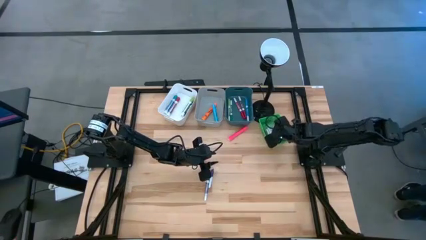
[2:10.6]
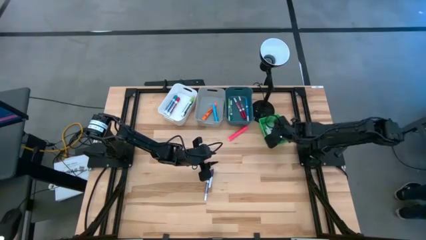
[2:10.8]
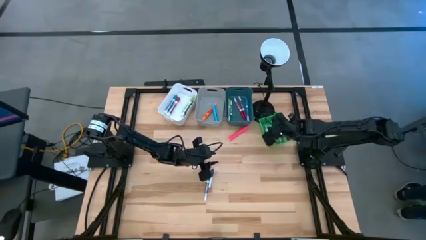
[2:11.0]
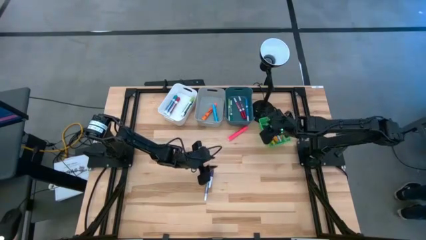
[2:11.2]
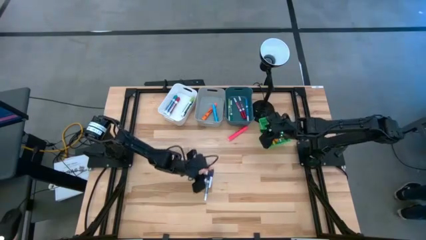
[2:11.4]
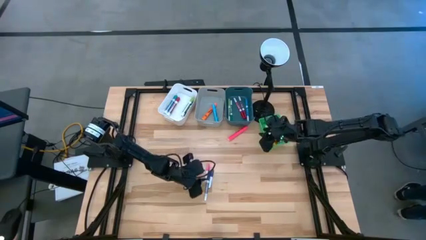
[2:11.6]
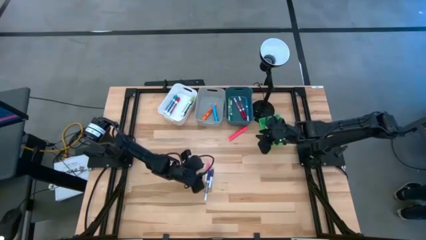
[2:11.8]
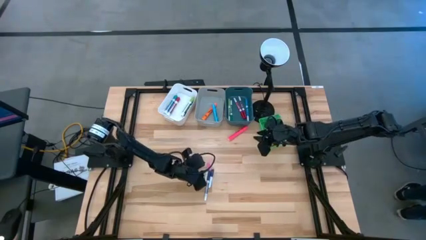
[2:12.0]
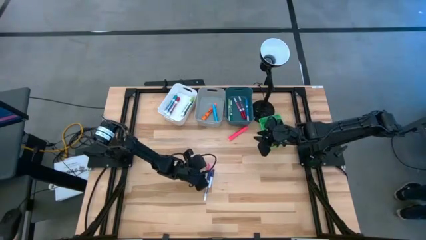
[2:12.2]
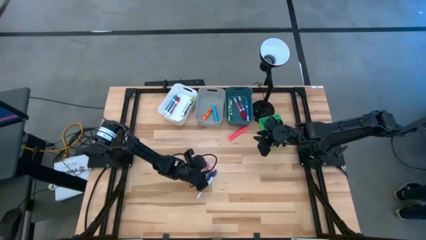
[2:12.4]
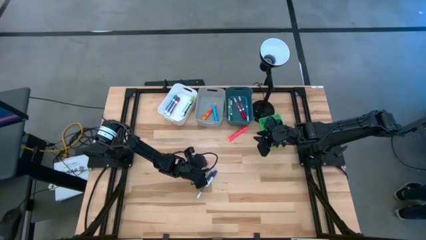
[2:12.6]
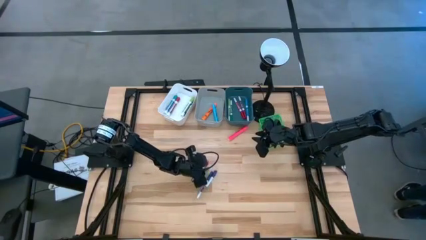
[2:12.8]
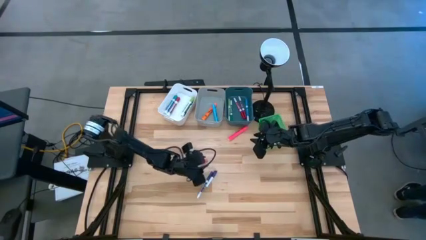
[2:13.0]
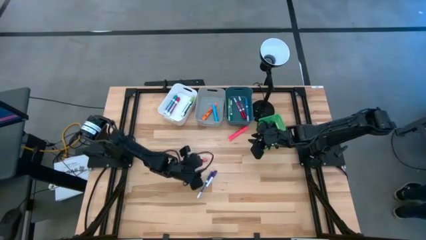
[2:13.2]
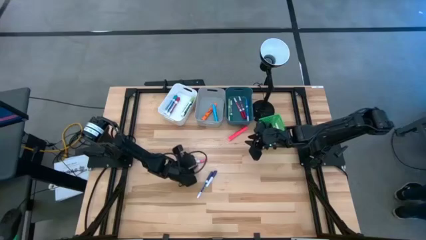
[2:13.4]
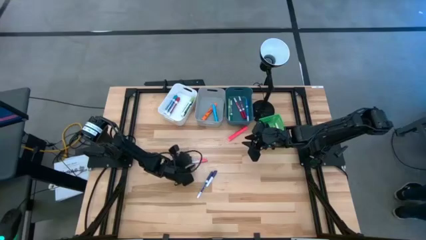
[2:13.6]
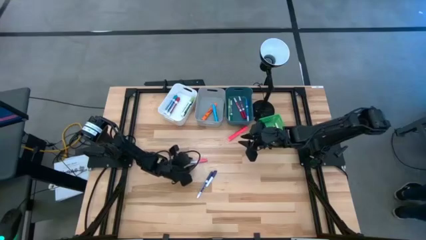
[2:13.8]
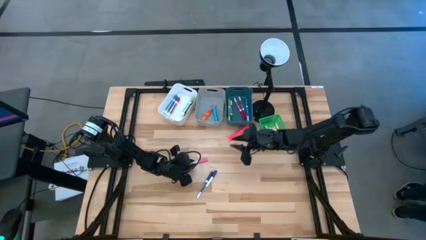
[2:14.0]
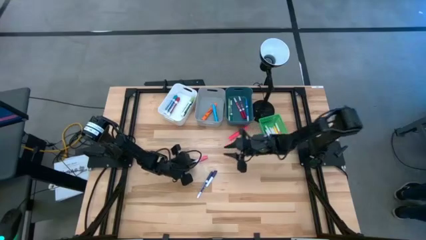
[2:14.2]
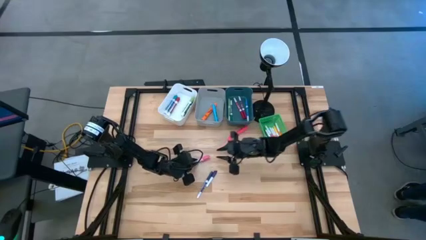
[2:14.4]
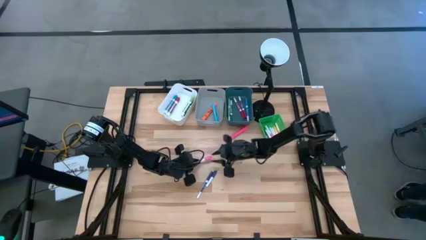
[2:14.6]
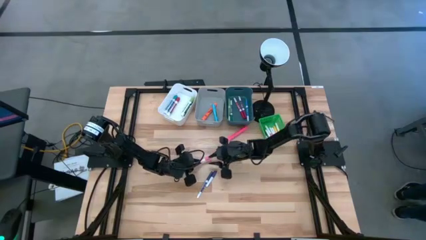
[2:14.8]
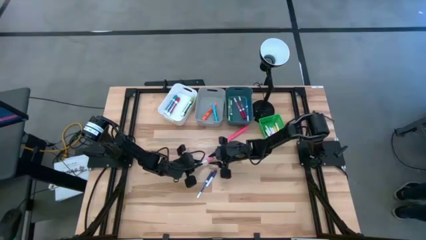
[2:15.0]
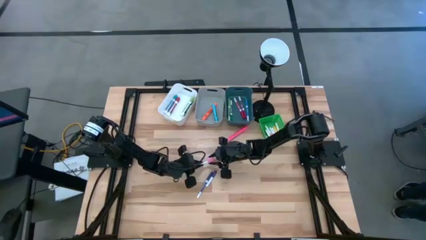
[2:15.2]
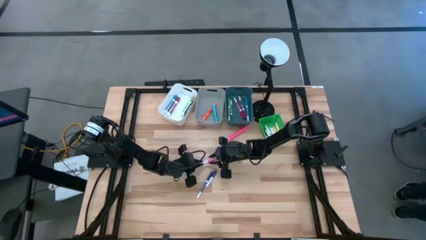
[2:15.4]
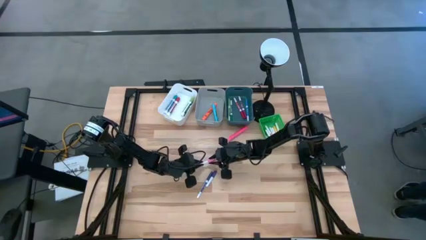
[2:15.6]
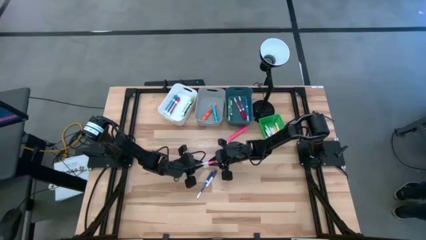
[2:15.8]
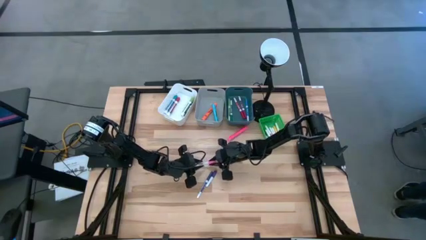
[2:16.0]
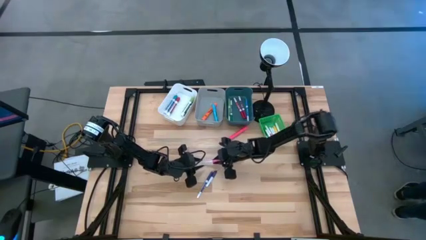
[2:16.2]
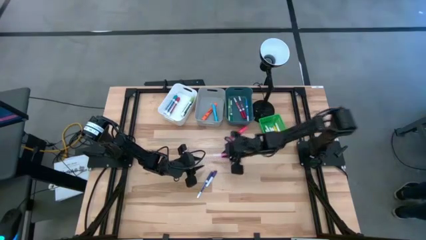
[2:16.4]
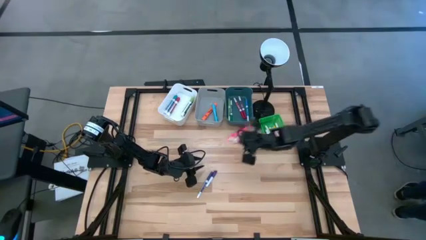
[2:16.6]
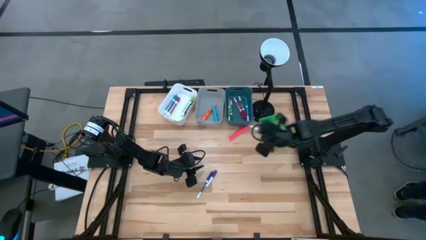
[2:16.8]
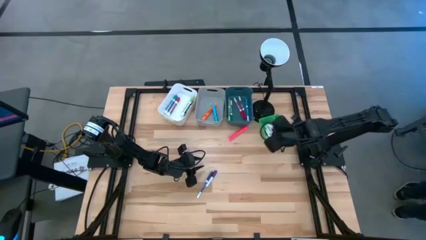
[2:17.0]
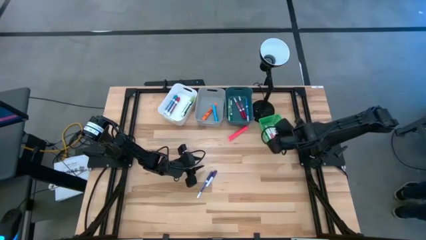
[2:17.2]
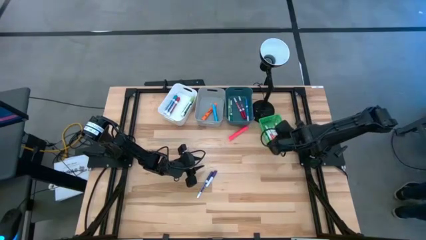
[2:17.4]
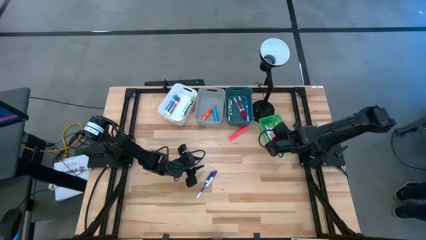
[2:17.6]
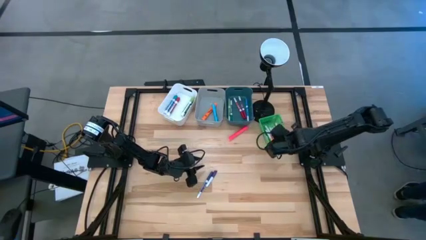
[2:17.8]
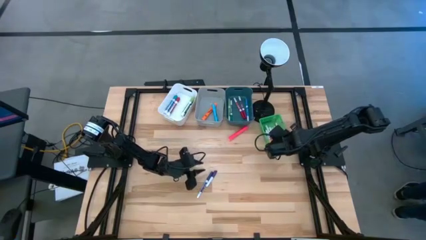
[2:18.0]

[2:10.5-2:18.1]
Task: Pick & Place Markers
Put the pink highlighter pen into the green bin

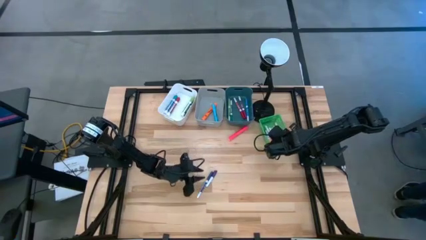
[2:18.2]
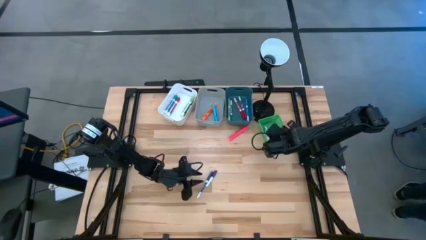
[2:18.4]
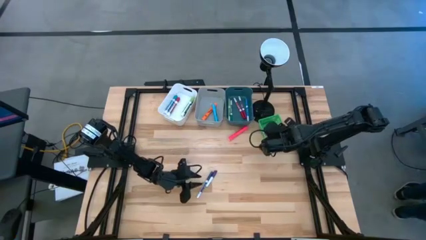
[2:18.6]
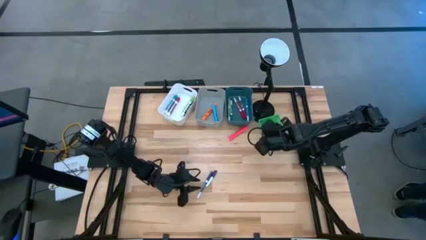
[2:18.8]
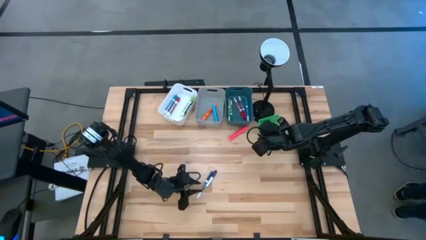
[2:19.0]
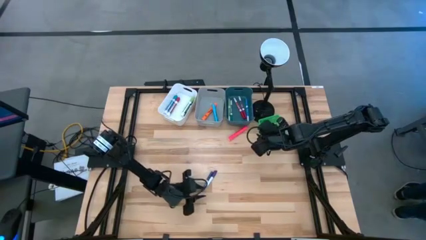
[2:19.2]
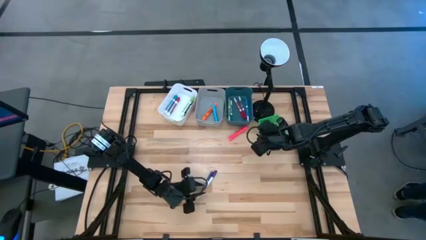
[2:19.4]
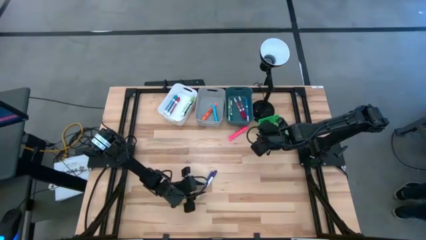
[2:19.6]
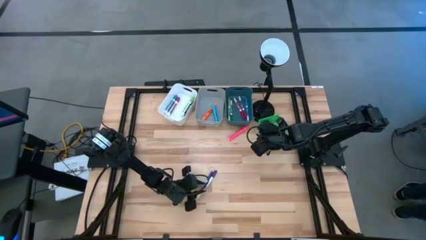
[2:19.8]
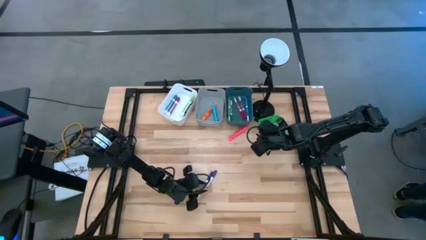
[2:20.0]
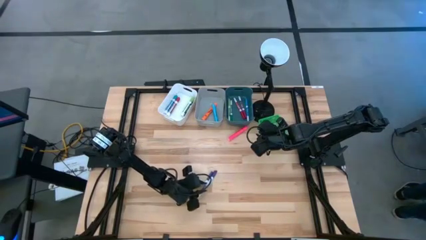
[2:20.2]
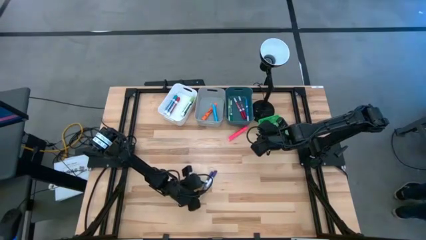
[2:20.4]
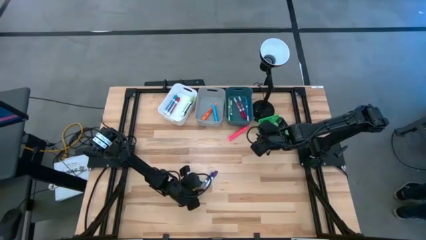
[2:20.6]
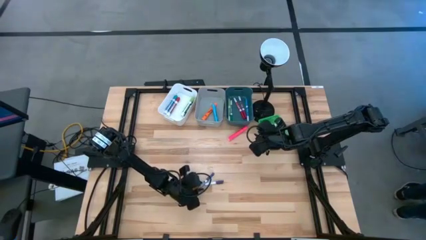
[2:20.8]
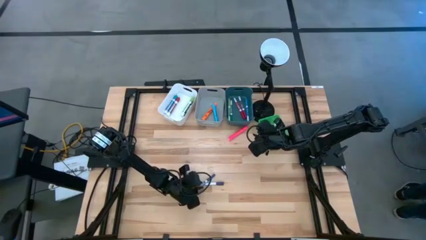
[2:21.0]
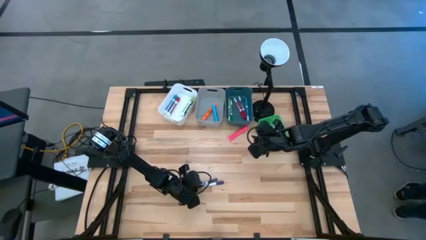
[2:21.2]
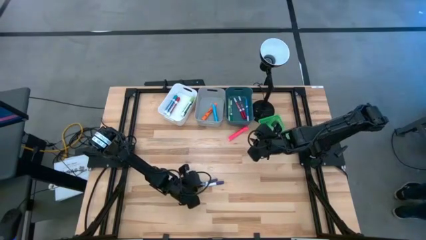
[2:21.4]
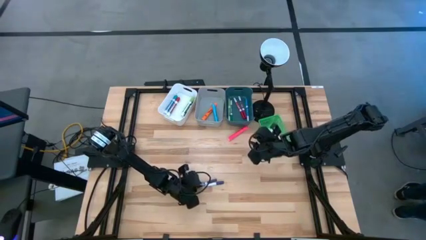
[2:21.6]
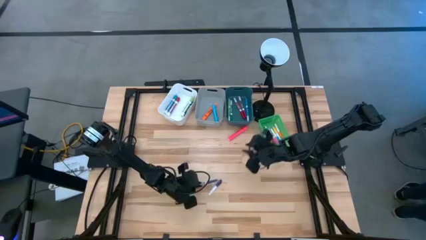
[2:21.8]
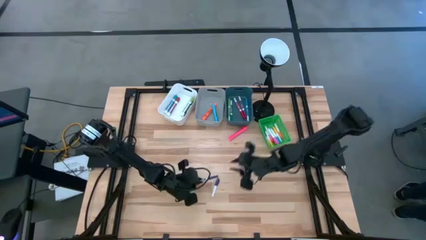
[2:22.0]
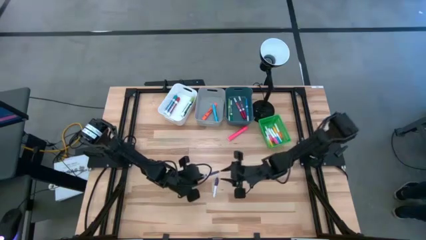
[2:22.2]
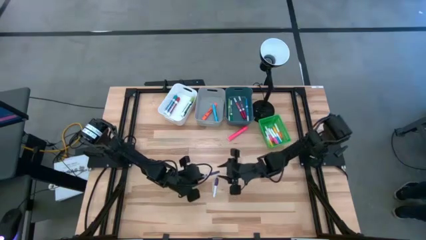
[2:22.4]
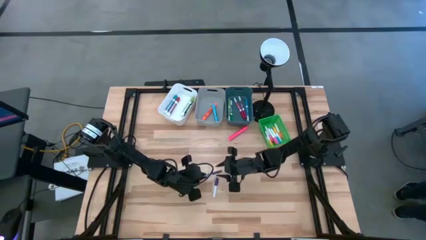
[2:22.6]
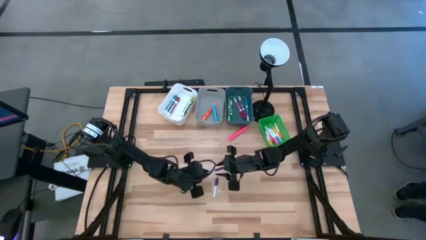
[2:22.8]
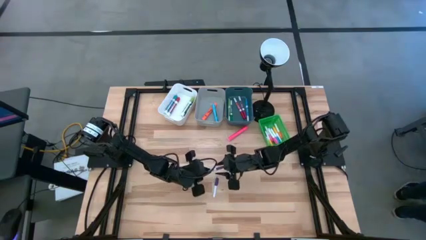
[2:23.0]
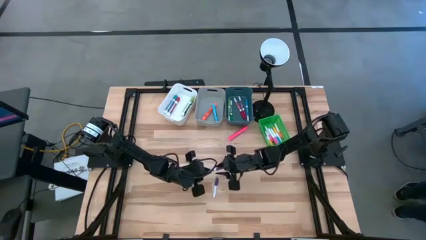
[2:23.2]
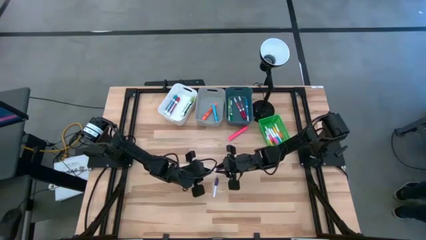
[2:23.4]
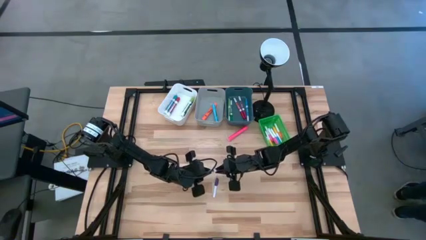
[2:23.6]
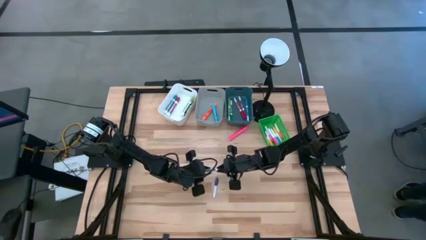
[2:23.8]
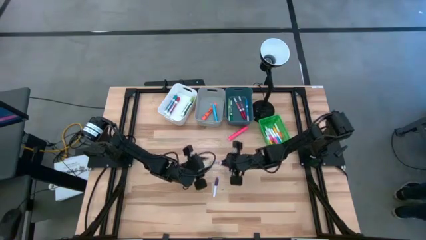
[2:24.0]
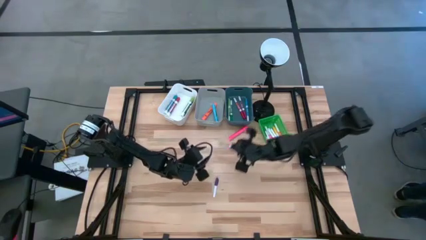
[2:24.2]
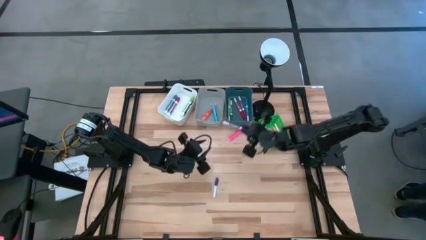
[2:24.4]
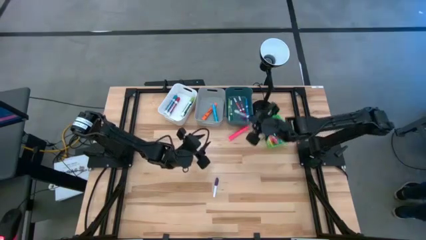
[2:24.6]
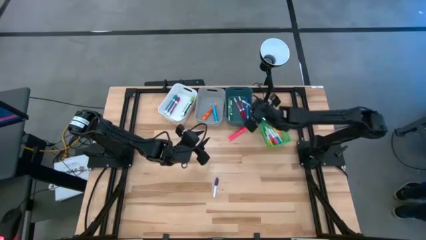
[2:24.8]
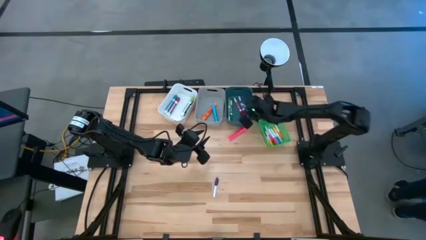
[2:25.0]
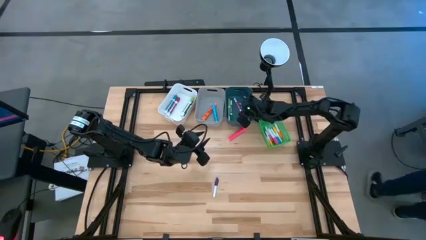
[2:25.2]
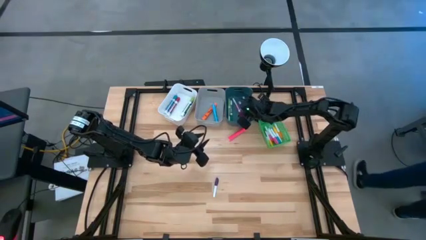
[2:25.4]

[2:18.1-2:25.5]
Put the dark blue marker pen into the blue bin
